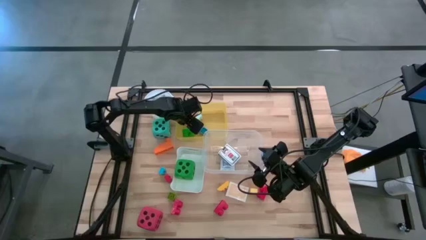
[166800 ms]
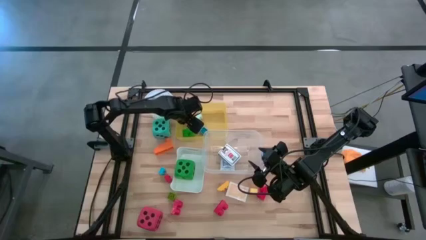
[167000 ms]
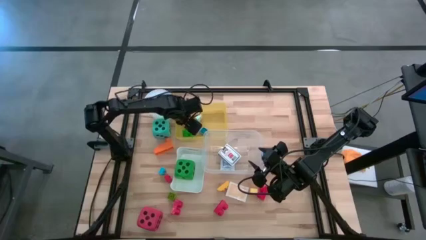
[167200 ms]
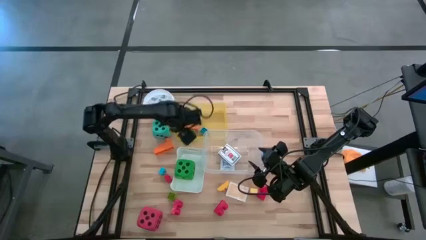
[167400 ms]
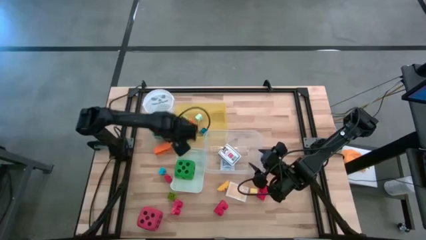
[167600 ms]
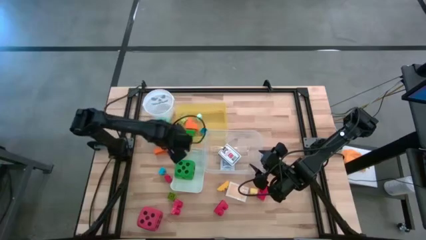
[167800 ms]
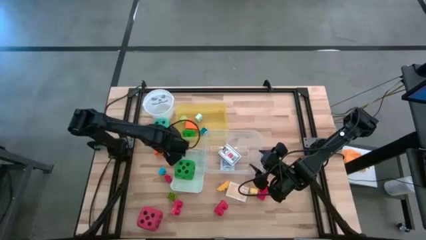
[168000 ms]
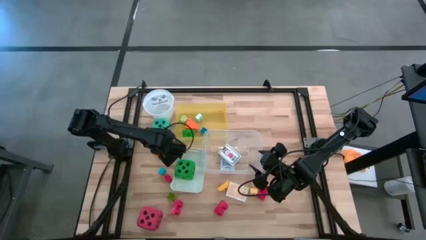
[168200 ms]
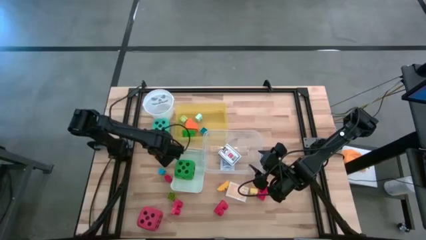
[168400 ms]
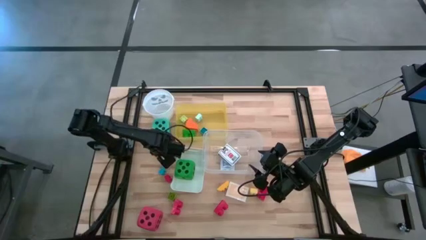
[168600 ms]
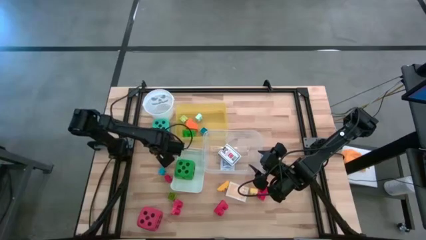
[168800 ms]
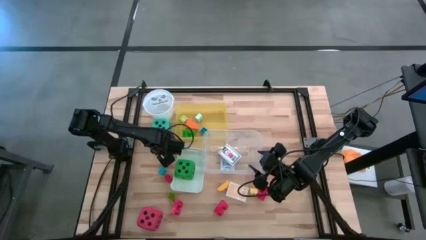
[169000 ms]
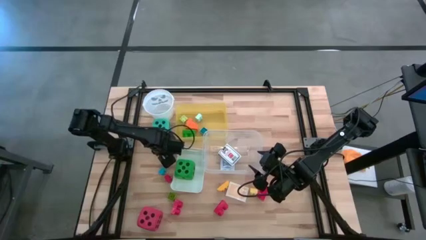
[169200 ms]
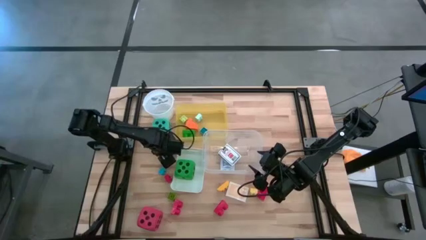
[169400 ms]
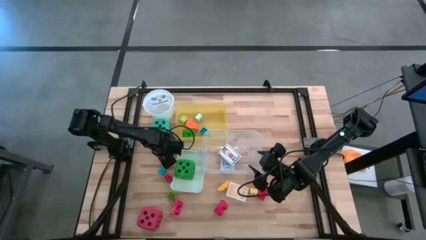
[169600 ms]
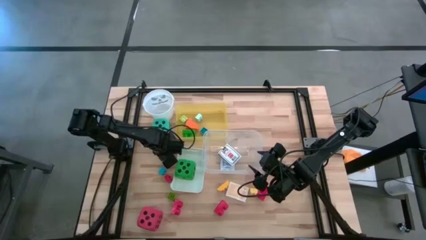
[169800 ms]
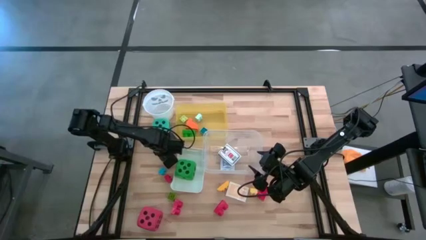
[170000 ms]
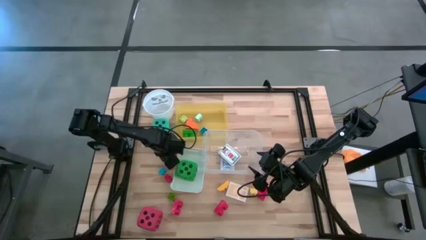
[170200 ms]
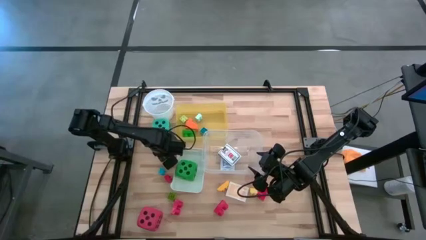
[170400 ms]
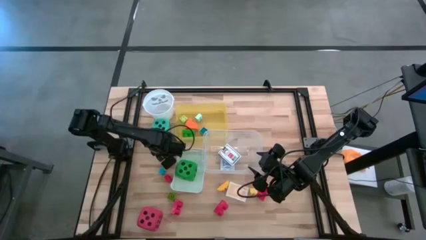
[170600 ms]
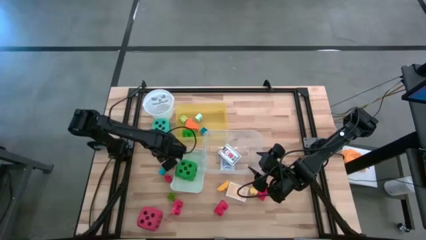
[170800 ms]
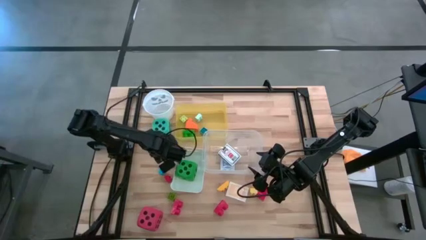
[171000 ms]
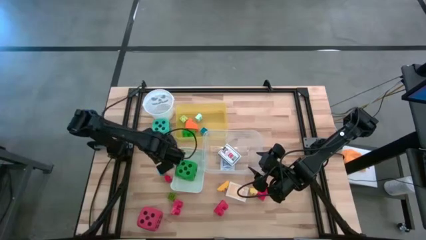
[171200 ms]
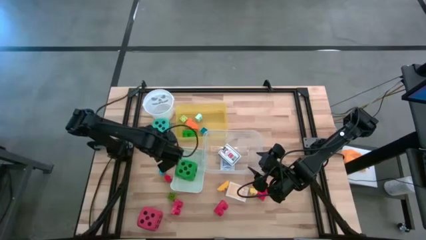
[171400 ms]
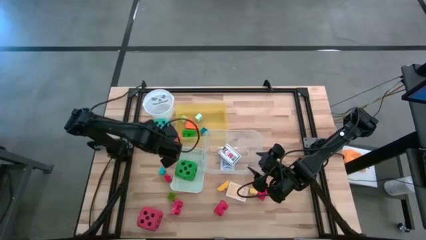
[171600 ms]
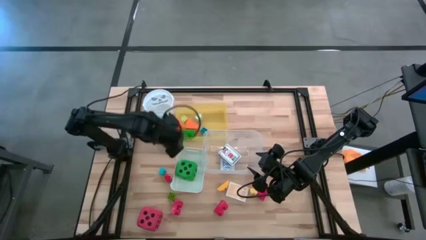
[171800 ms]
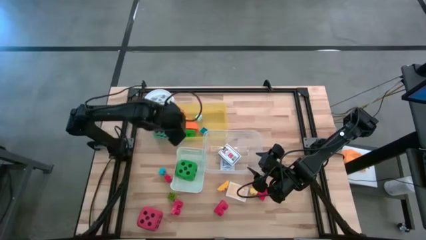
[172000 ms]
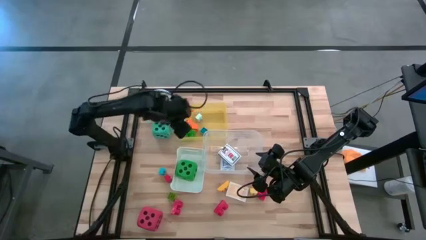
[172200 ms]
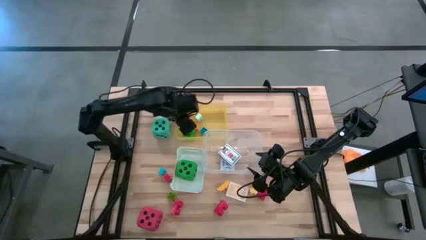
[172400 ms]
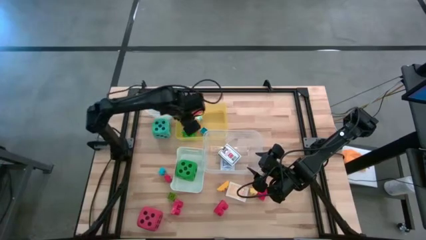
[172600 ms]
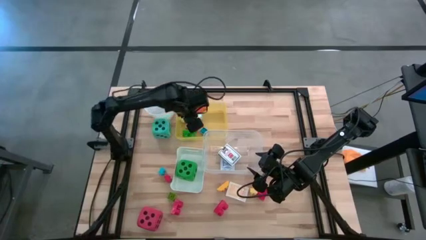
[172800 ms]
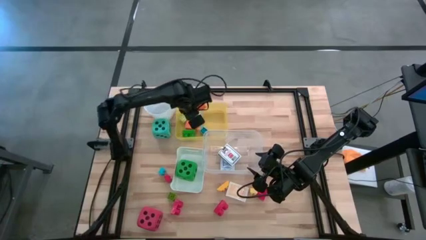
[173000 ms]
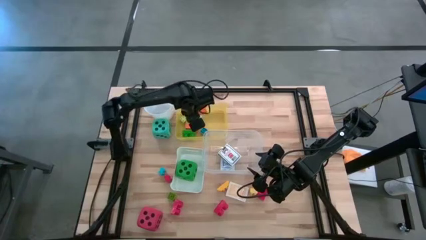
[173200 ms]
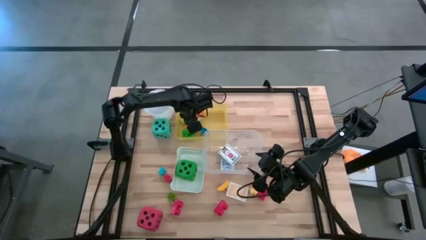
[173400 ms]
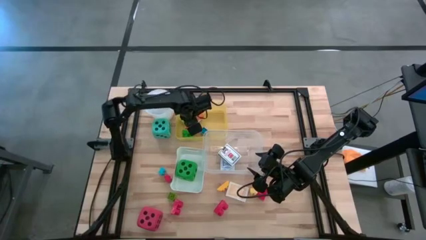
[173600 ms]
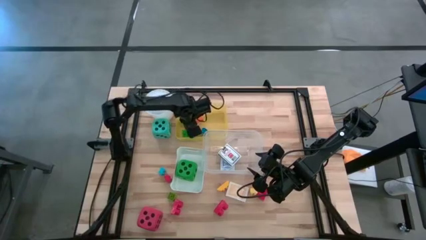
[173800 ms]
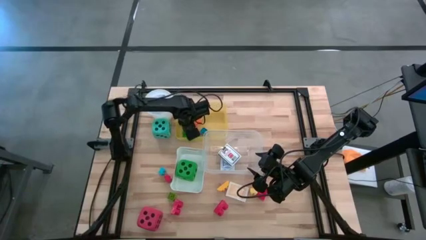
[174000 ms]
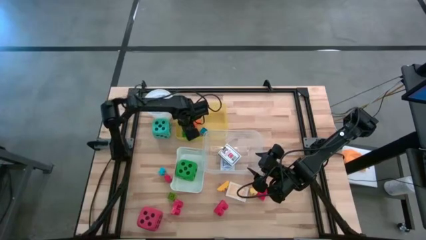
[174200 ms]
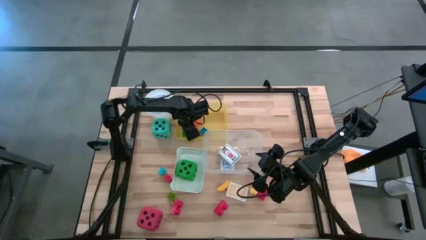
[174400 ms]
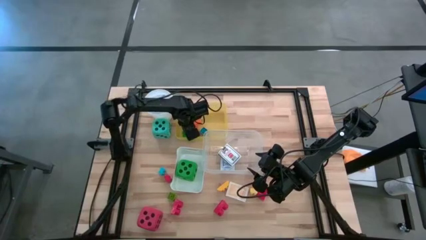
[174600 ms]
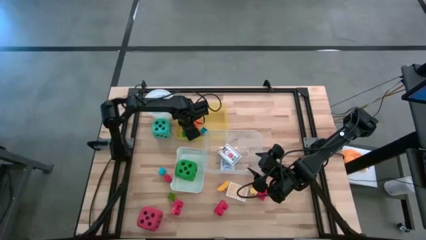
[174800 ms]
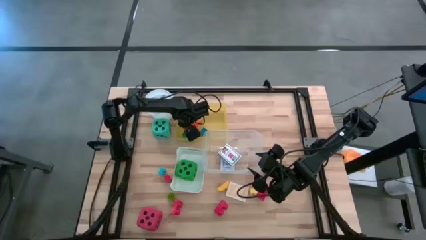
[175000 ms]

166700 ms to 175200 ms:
Task: Pick & Place Toys
Put the orange game piece into the yellow bin

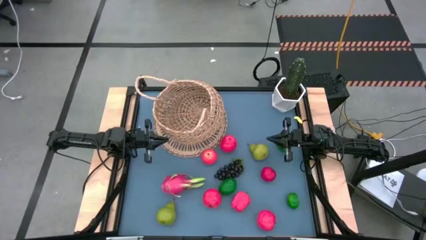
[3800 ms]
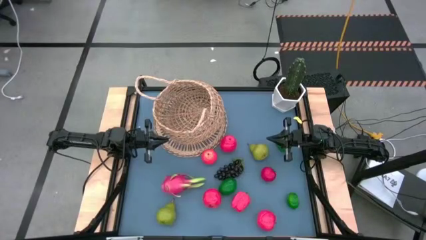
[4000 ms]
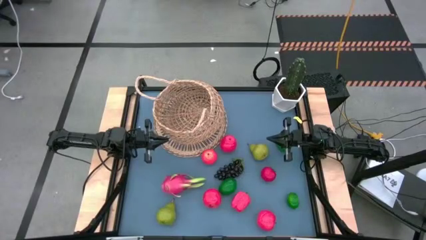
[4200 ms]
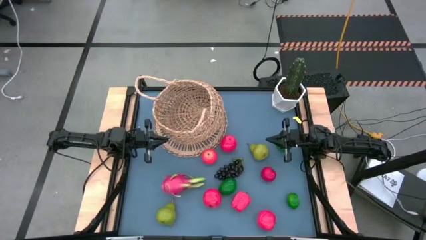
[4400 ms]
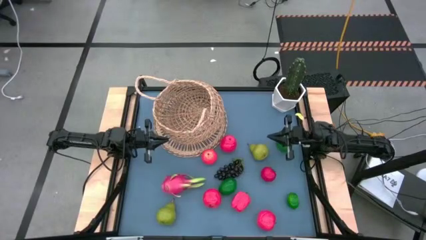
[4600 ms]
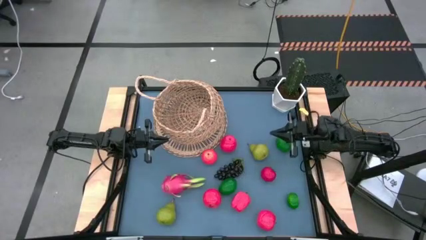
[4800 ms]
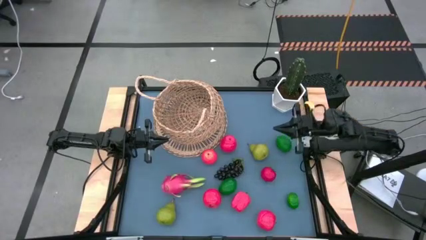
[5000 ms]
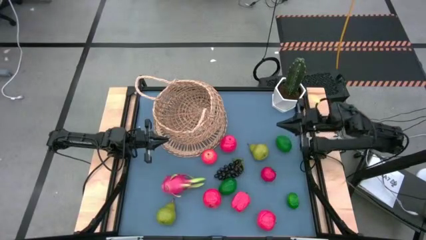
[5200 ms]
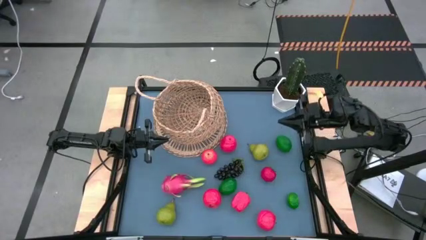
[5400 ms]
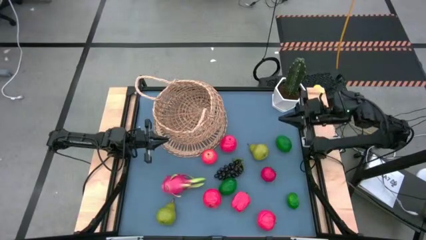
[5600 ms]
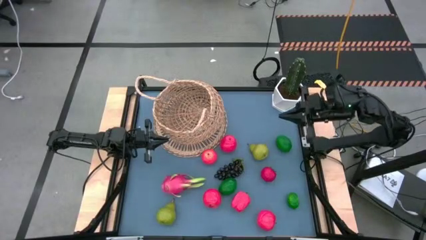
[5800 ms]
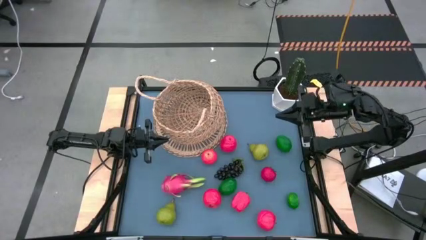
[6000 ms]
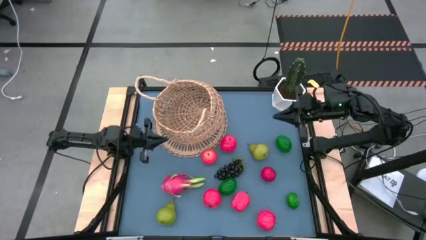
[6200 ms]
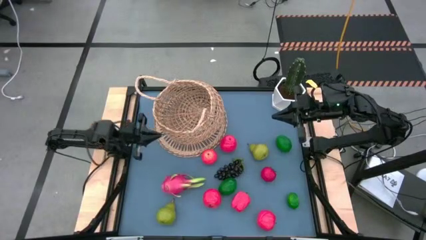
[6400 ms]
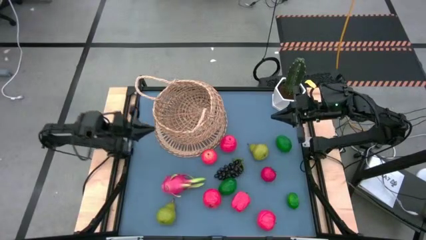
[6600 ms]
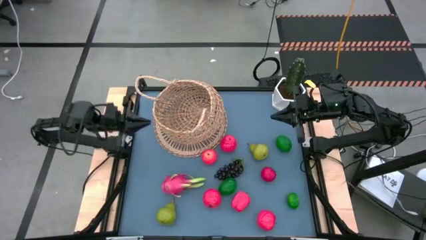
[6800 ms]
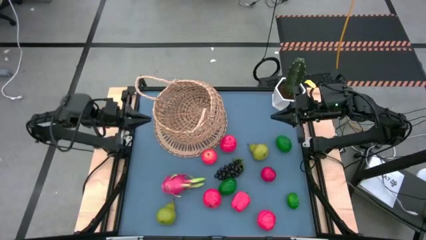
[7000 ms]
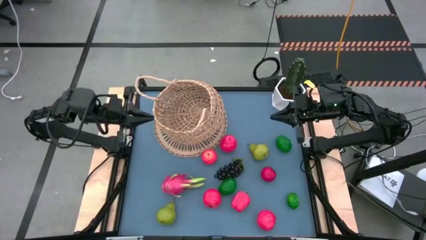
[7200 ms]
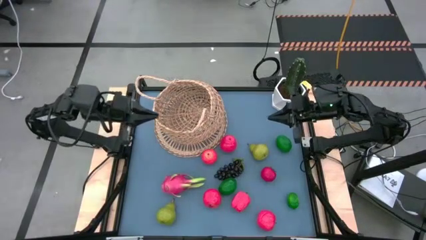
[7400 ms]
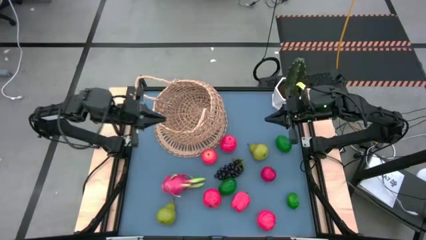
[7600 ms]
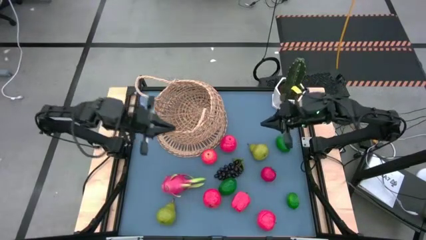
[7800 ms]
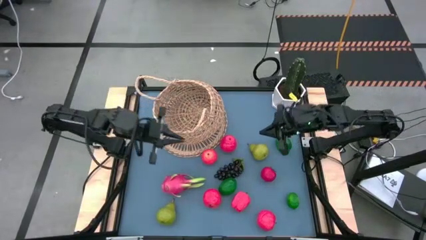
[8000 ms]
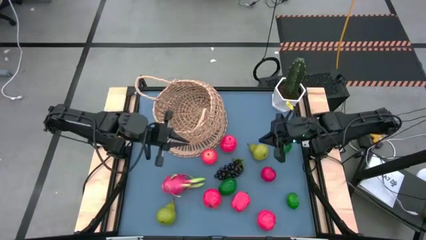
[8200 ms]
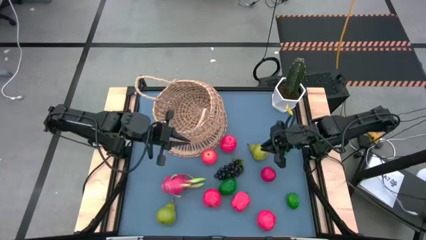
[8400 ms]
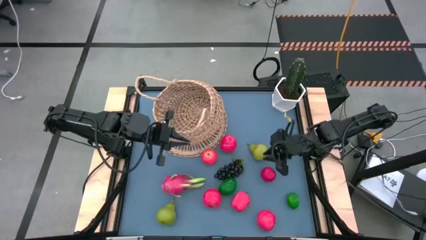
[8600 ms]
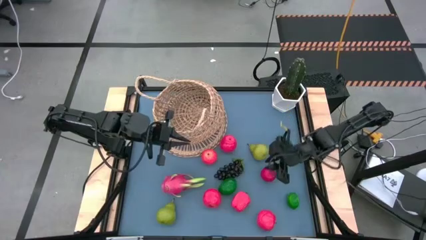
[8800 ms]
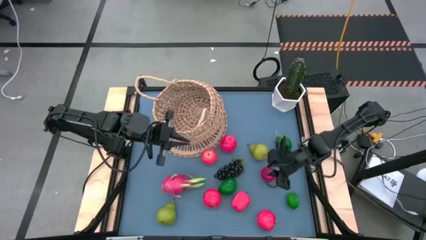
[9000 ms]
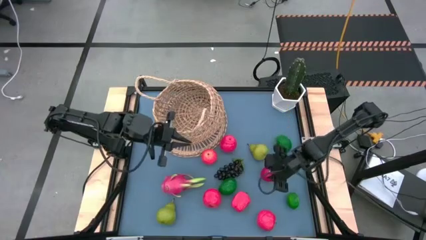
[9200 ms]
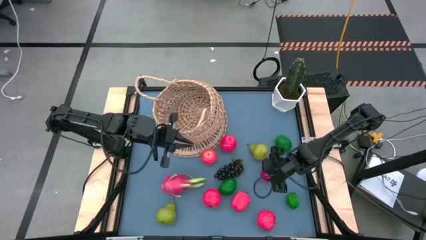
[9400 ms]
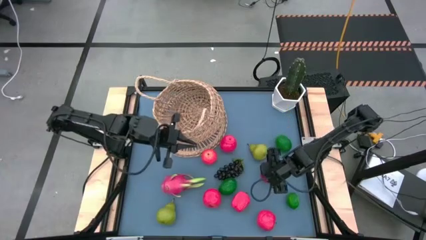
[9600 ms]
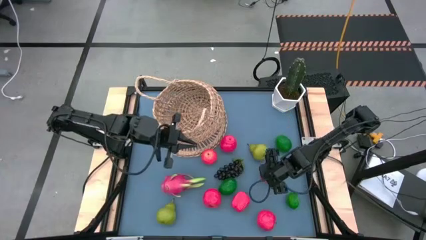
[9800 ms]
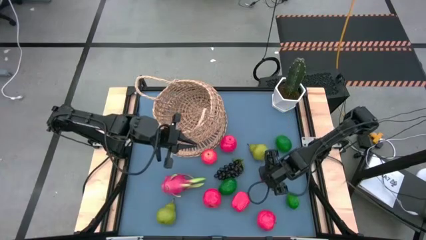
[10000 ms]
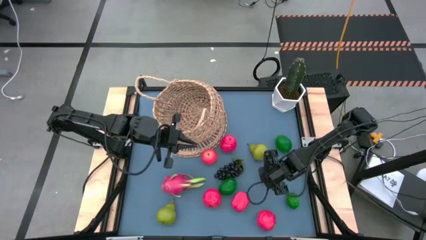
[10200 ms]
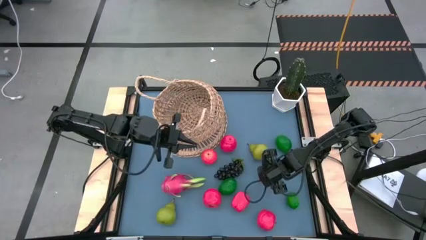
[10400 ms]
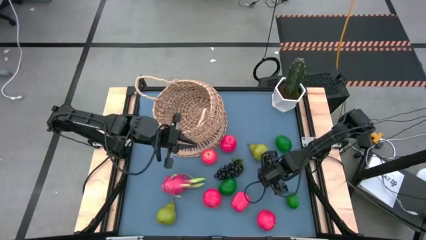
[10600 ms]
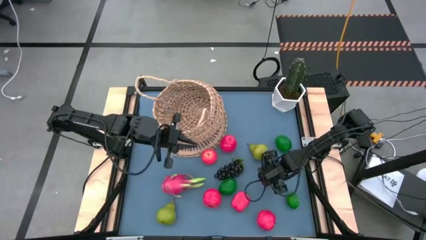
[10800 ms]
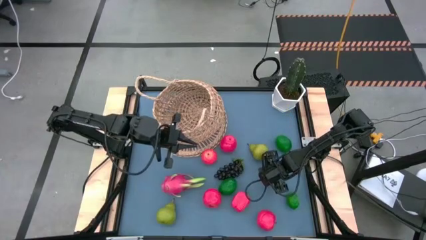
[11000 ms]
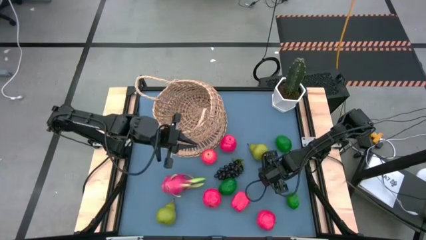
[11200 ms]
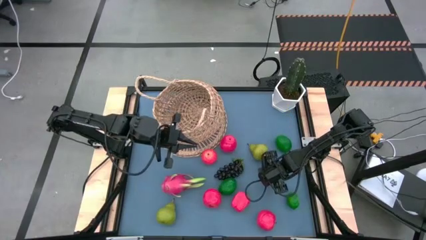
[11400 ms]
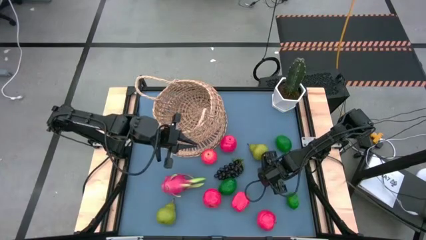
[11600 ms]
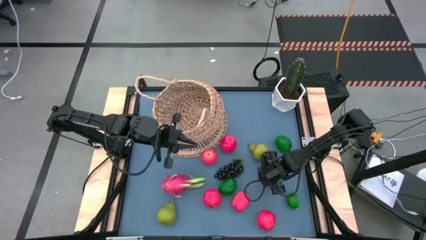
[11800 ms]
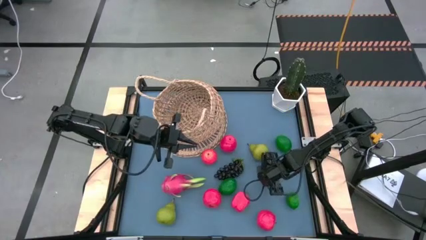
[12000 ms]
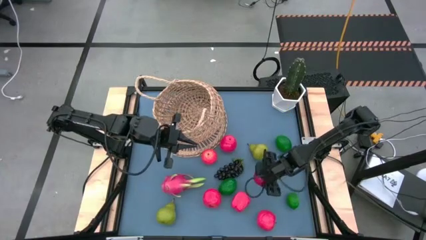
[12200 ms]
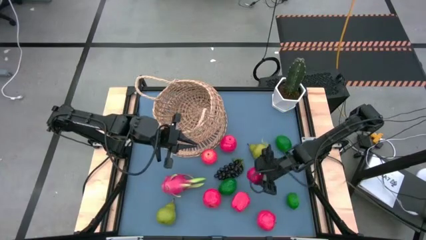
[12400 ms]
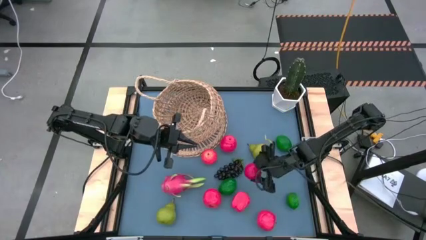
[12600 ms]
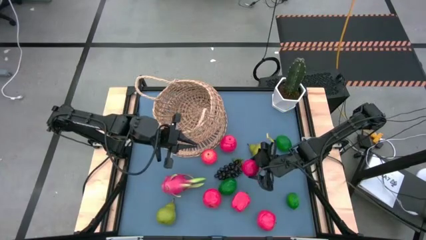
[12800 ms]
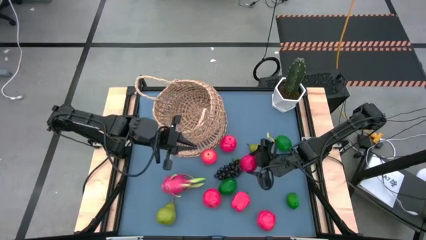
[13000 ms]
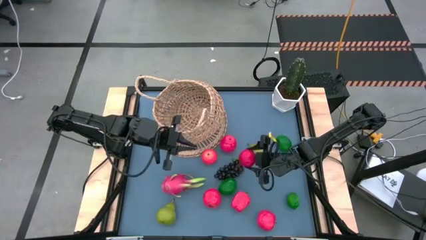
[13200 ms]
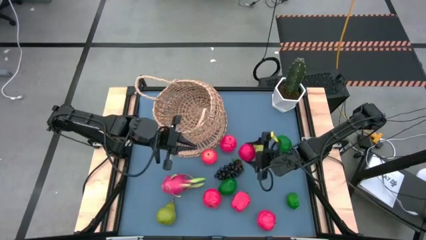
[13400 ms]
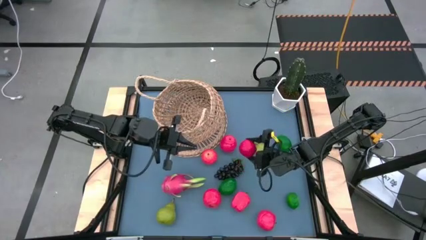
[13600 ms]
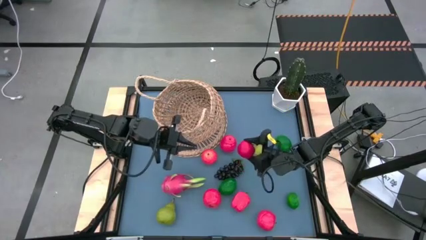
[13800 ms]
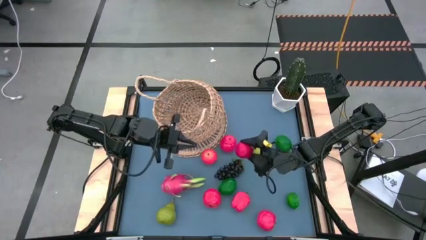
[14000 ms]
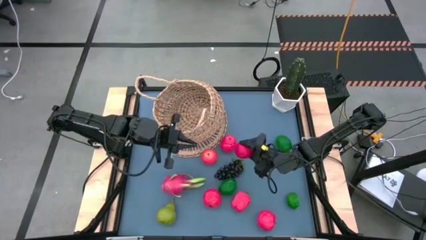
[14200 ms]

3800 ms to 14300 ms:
Task: Build produce basket
Put the red tomato into the basket
